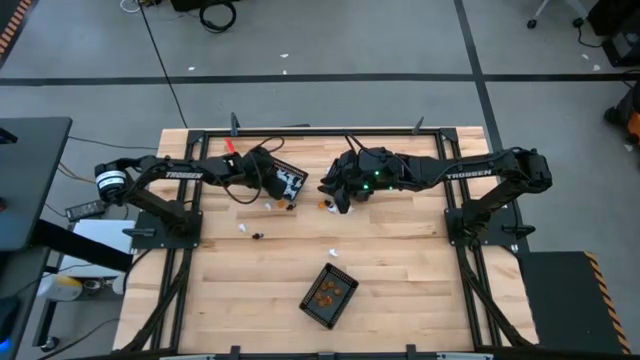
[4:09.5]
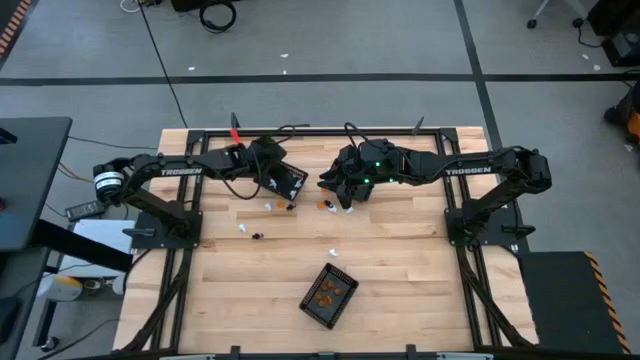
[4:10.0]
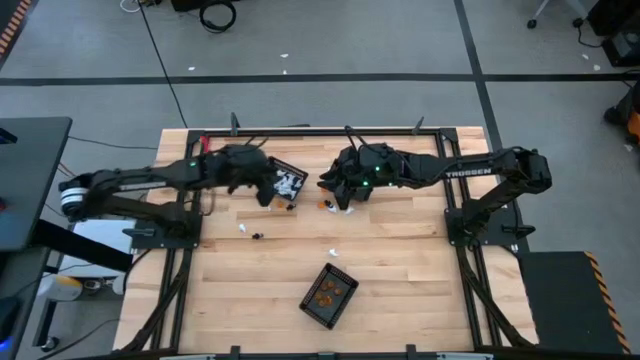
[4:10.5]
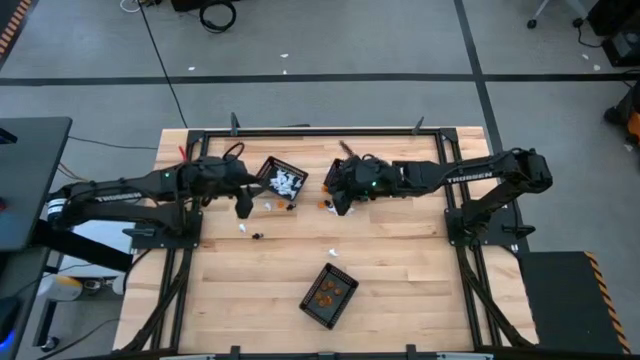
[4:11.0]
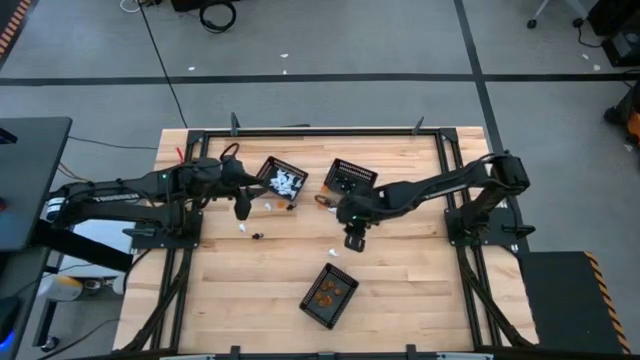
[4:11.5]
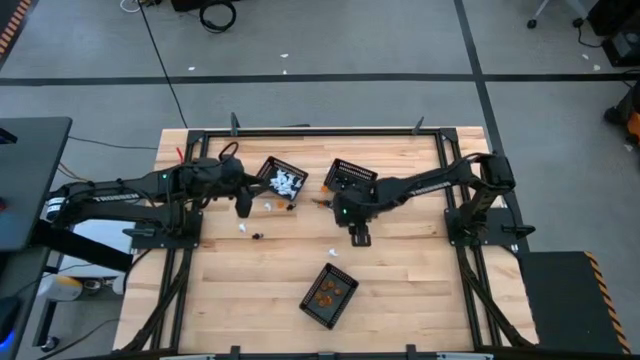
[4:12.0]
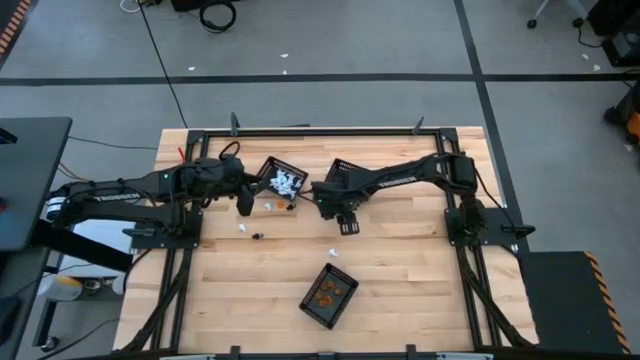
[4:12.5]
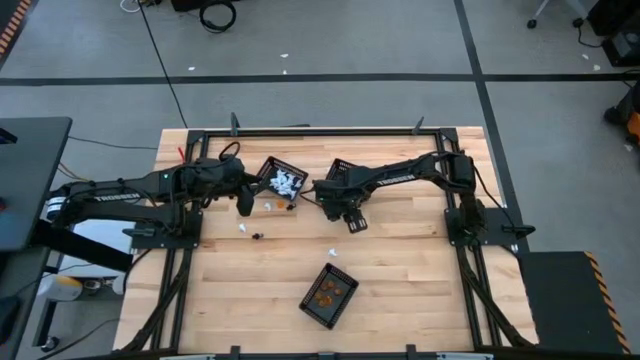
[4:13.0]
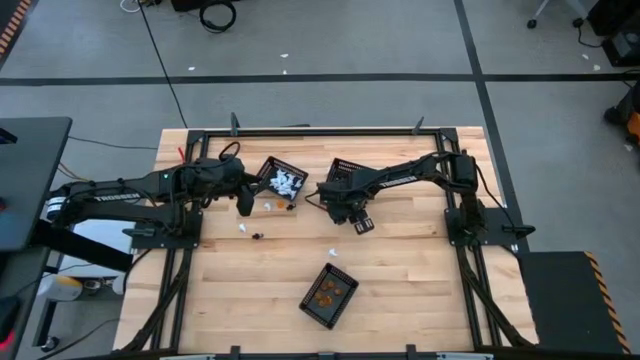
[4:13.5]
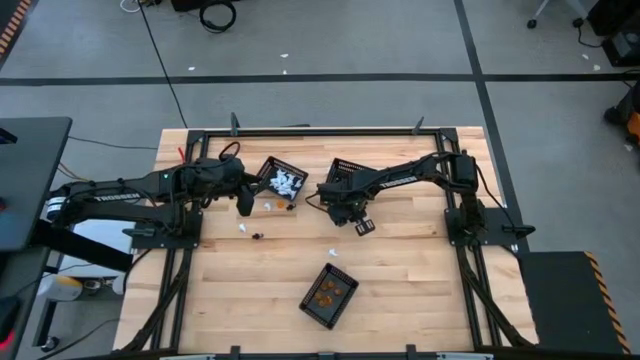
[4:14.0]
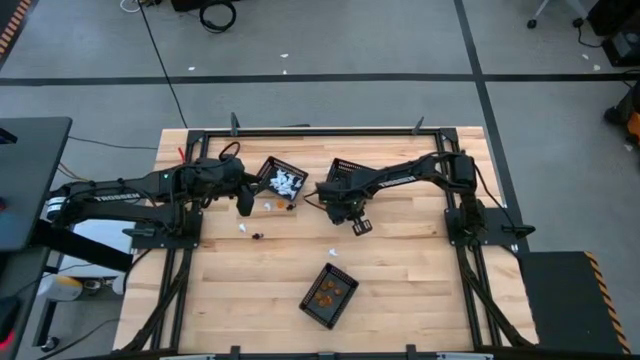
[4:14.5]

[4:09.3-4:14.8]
Task: Sort Halloween decoration
Put the white ghost toy into the top left black basket

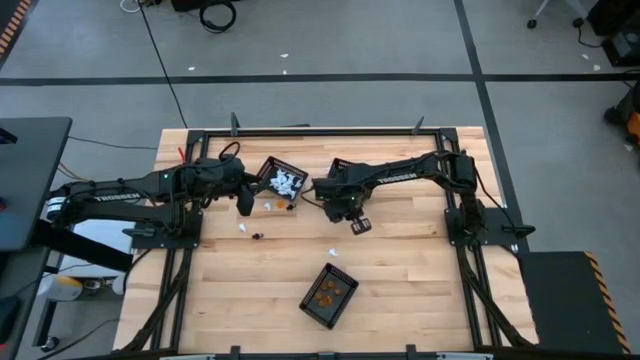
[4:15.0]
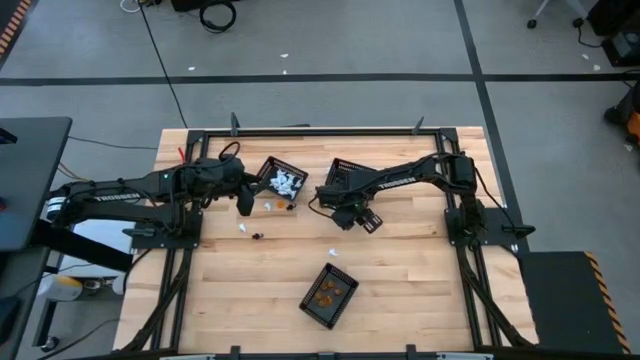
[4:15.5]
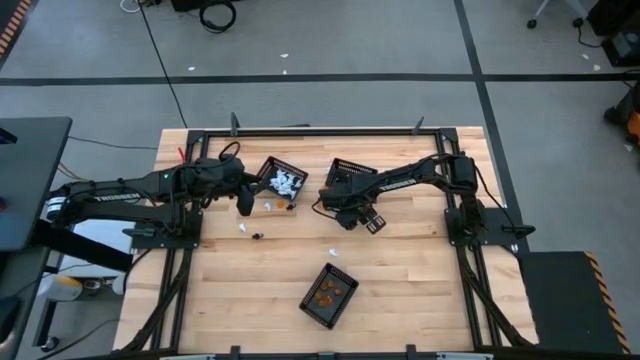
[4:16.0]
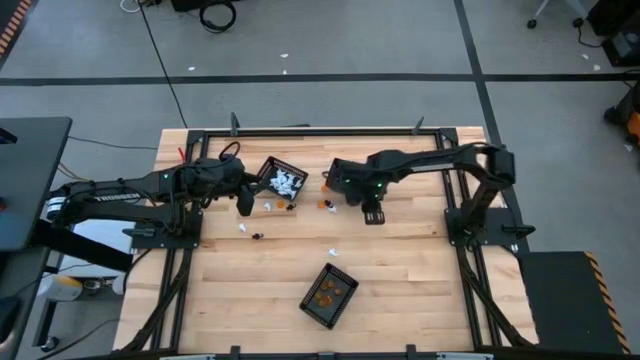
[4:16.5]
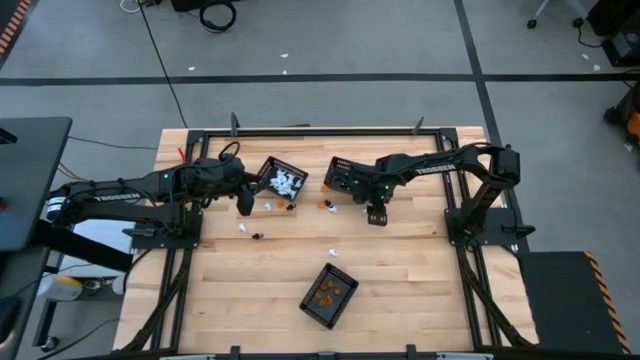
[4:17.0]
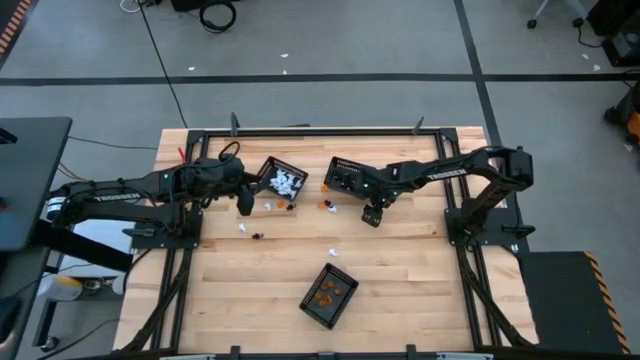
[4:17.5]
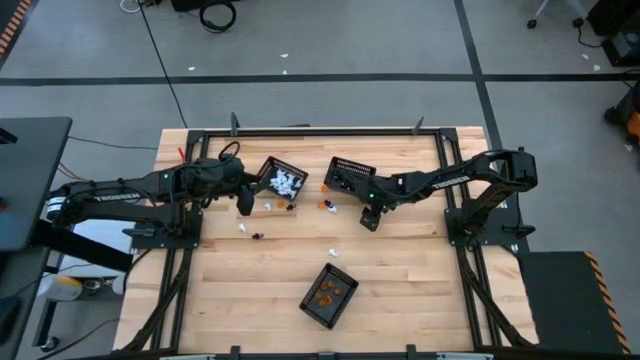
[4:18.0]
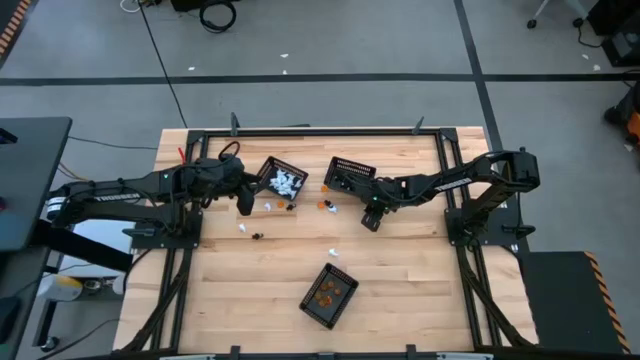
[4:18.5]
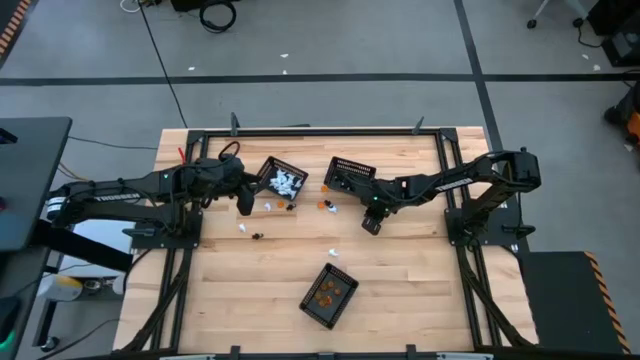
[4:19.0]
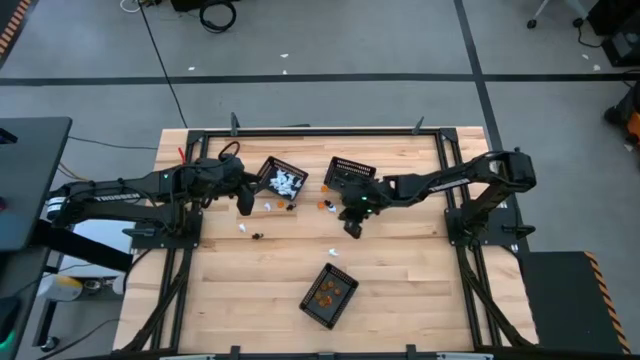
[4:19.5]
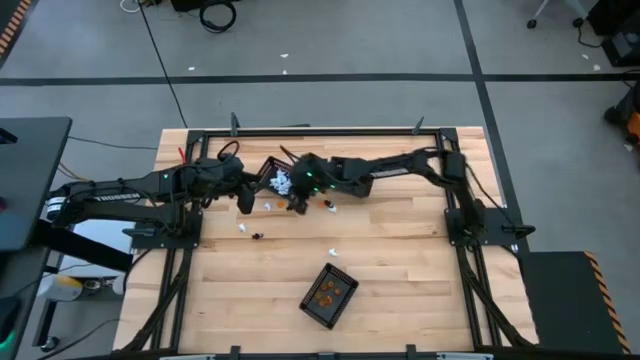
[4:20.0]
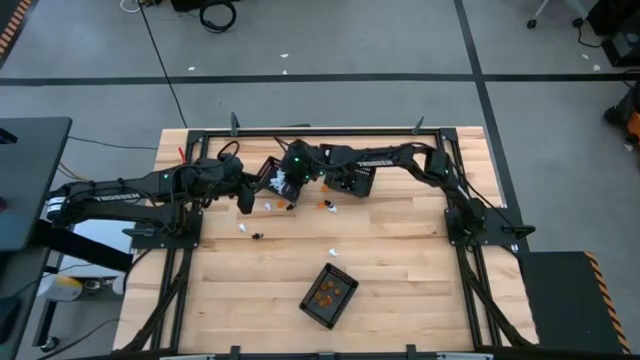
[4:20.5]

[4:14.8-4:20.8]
Put the white ghost toy into the top left black basket

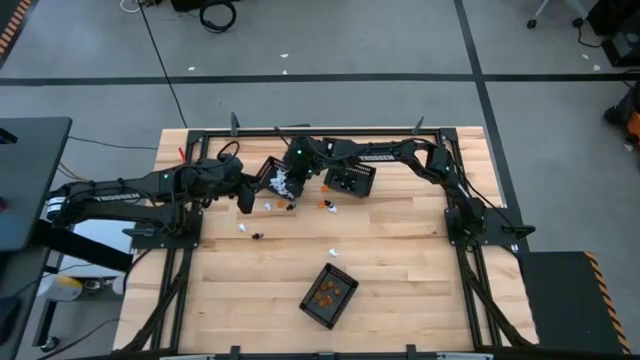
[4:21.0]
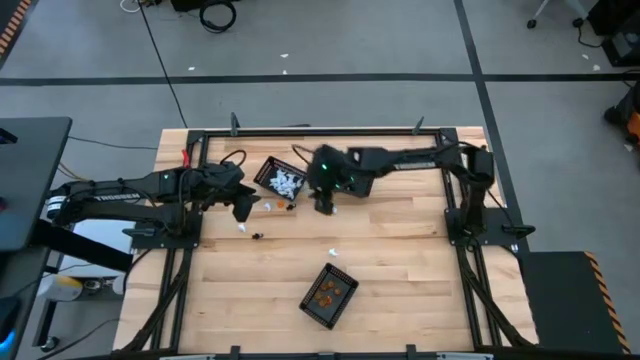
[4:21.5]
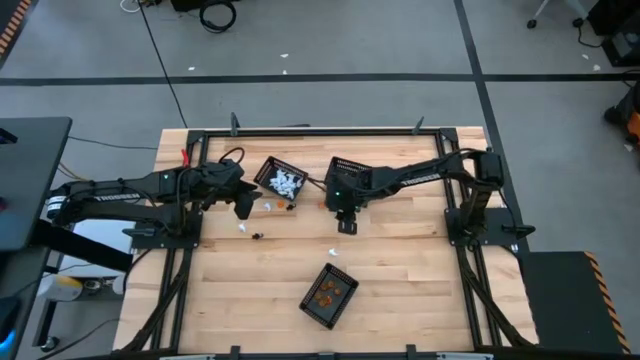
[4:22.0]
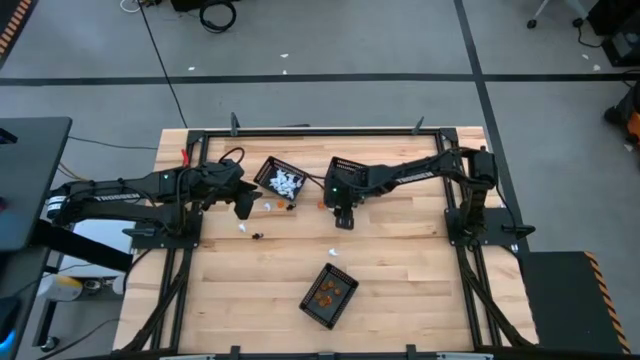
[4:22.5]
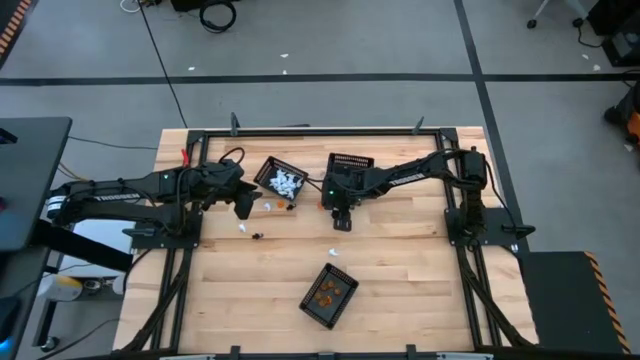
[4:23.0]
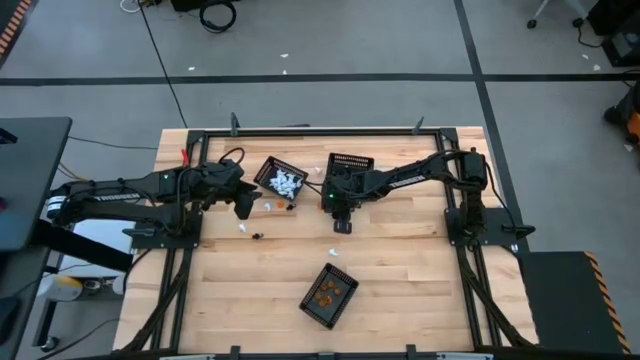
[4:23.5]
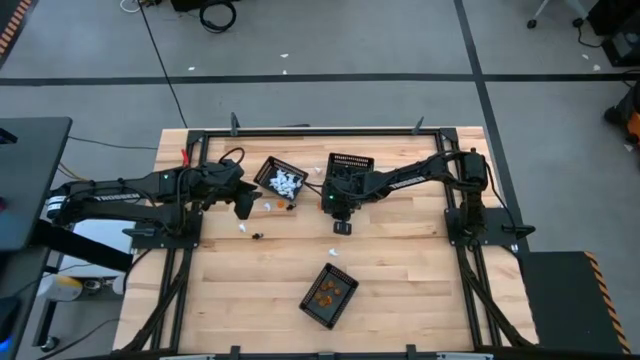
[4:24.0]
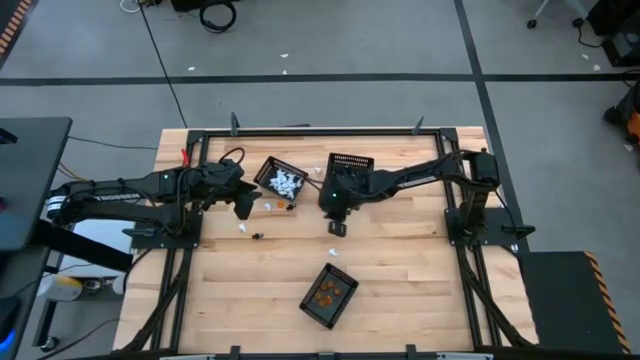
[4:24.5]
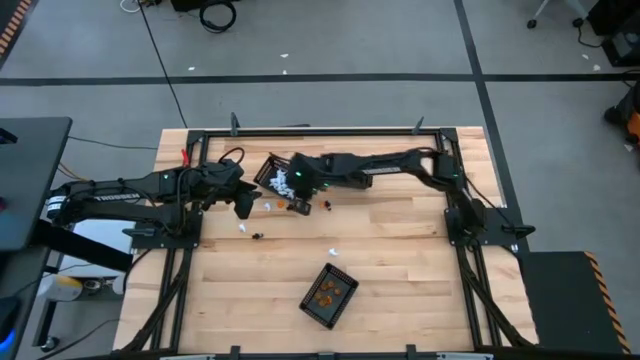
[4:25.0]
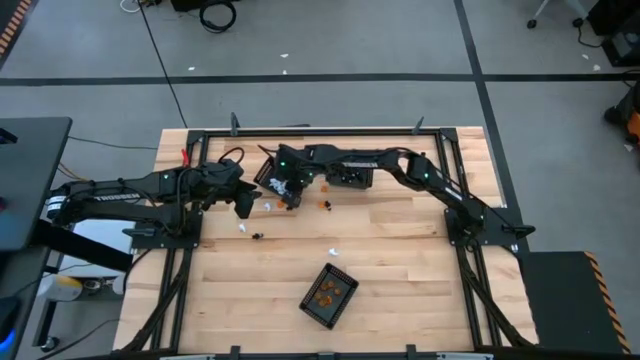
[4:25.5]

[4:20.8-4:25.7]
Put the white ghost toy into the top left black basket

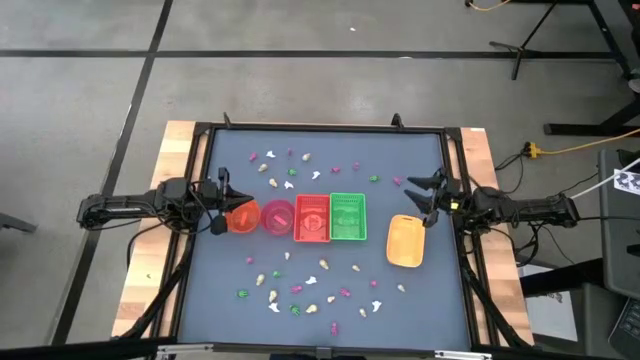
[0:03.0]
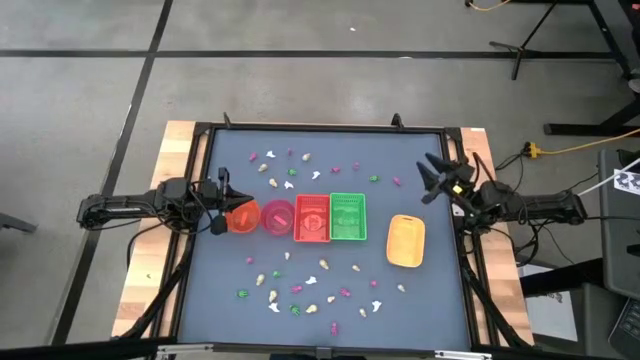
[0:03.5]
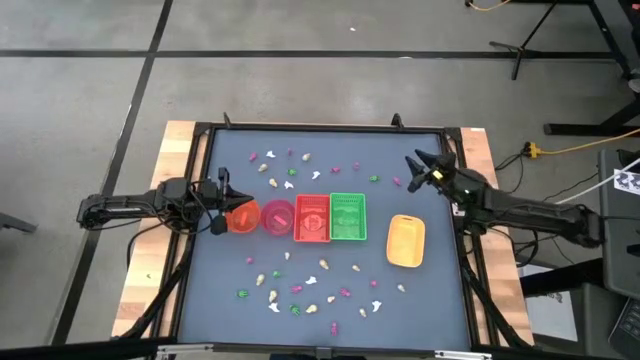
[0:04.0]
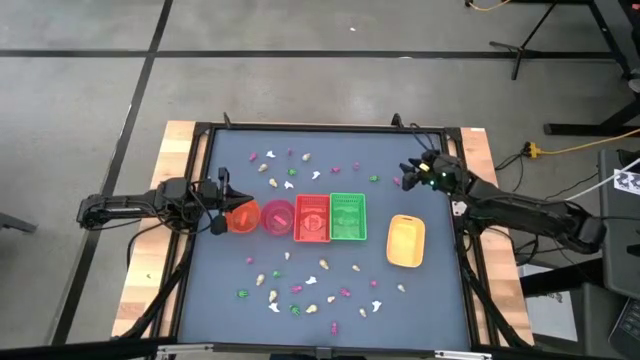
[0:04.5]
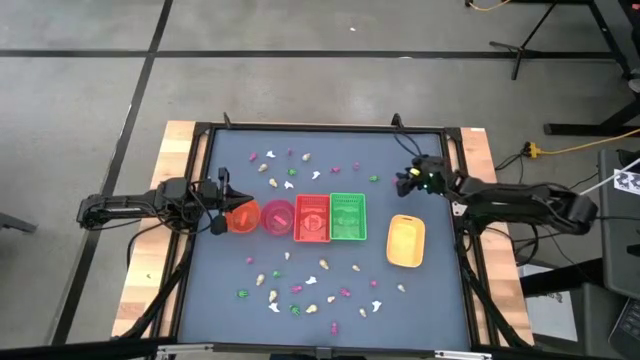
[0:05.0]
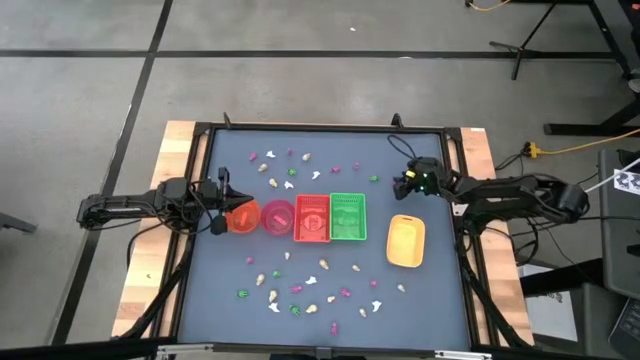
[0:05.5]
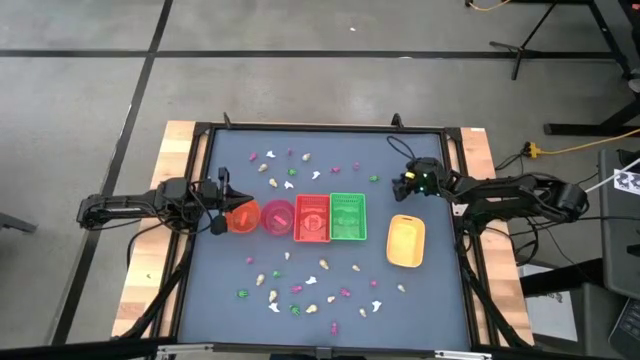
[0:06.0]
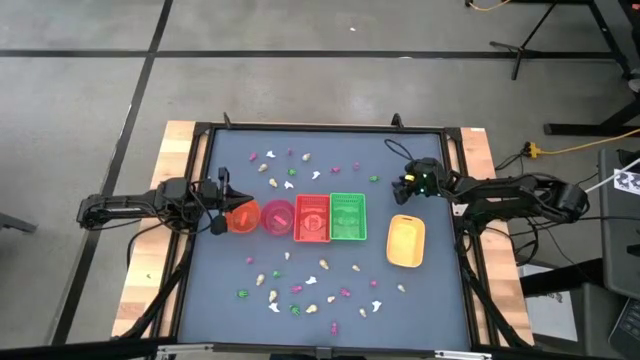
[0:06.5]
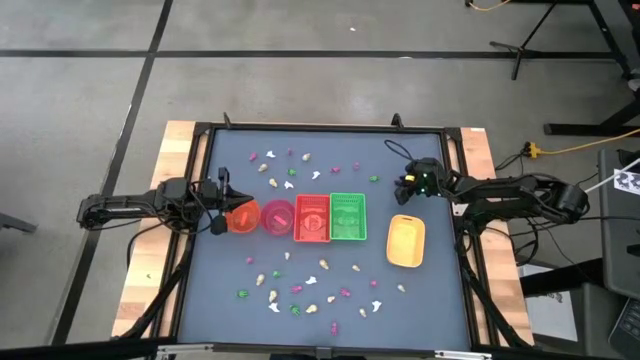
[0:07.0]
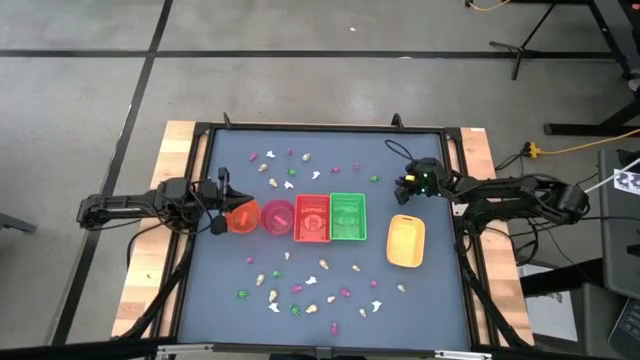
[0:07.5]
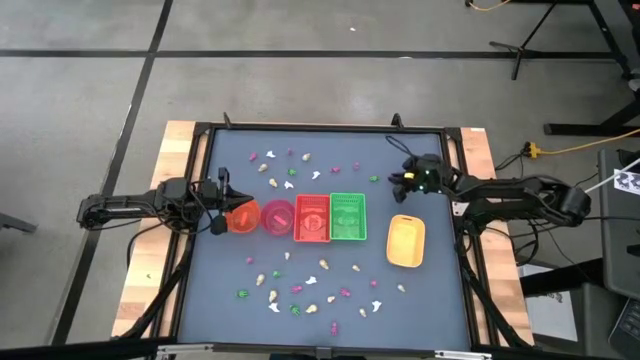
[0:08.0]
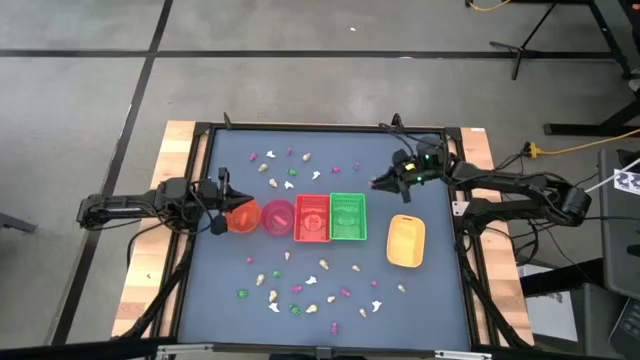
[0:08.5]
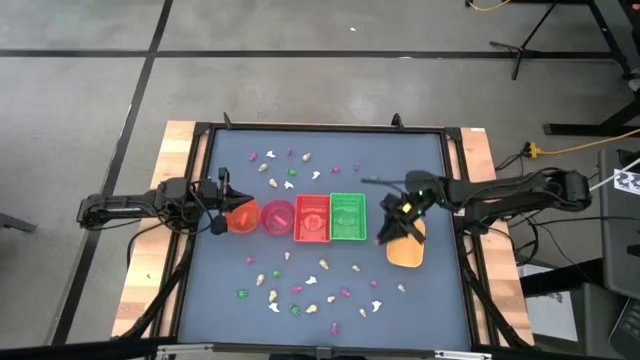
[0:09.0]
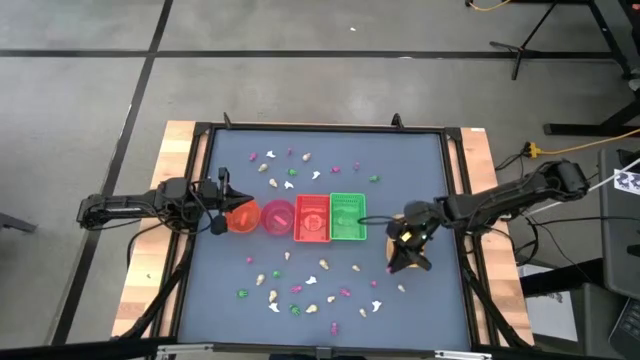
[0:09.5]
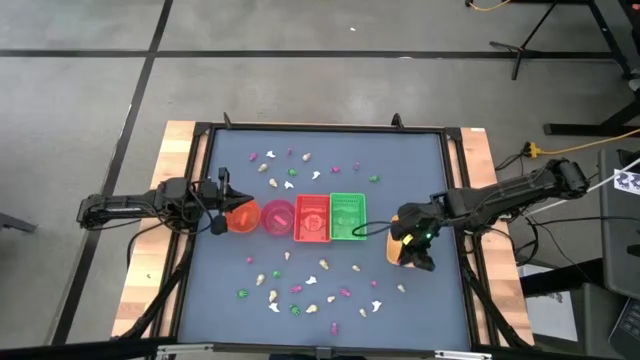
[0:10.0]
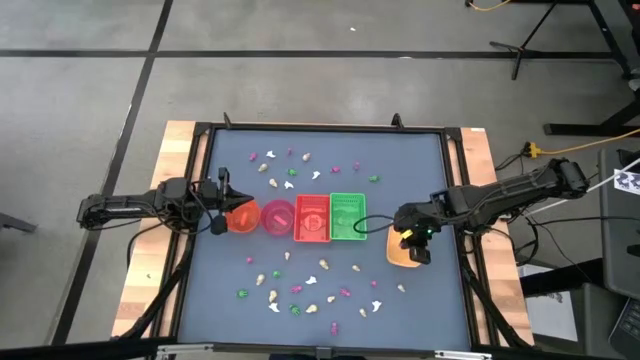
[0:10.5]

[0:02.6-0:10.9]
Task: Sort Halloween decoration
Put the pink skeleton toy into the yellow bin
